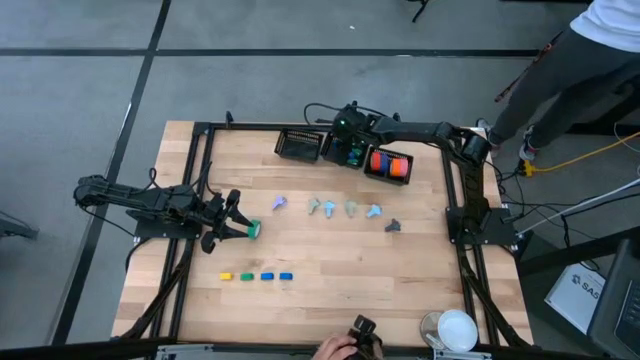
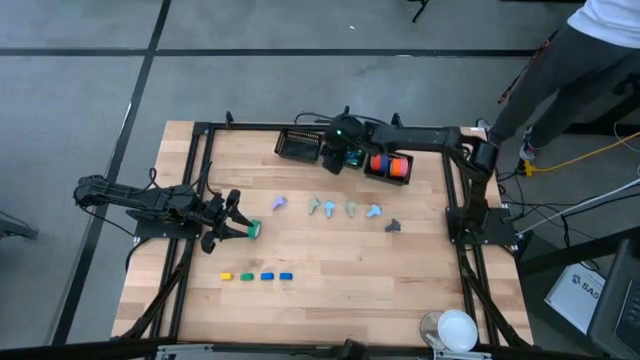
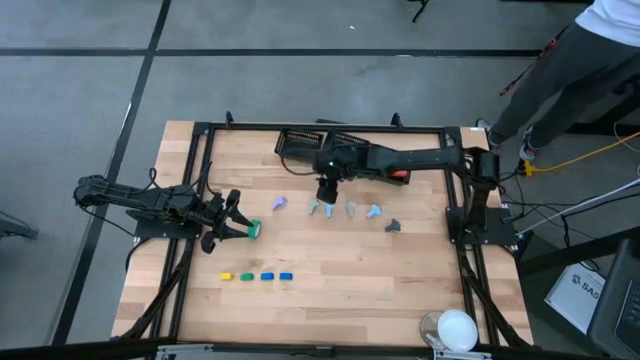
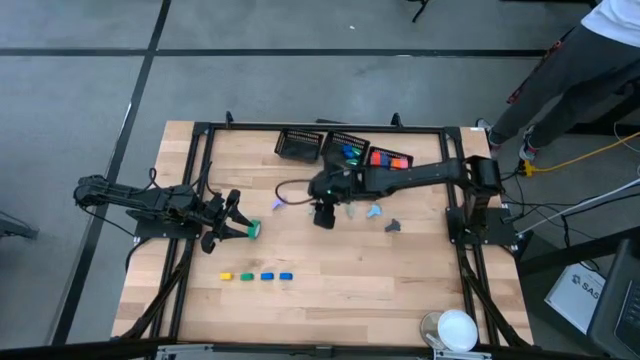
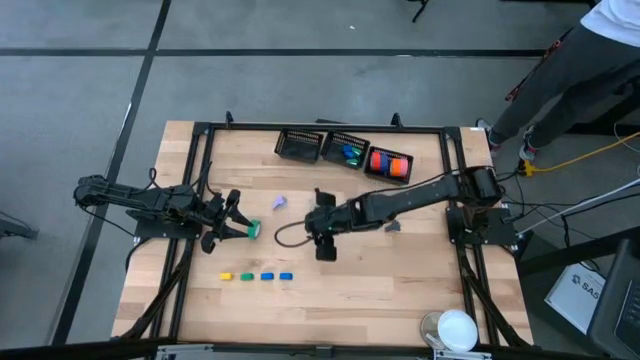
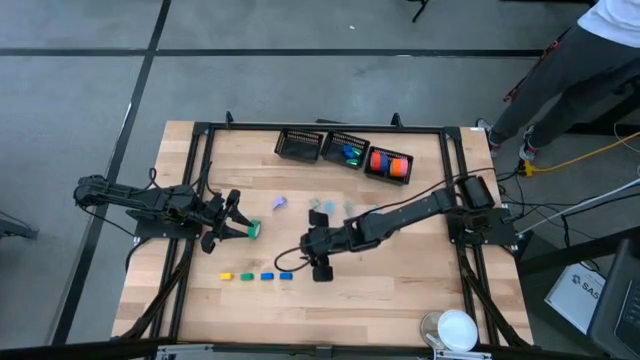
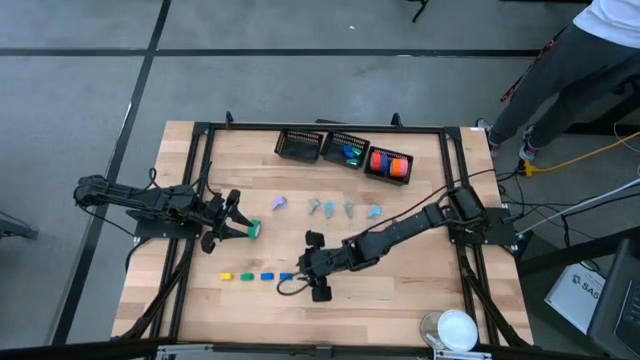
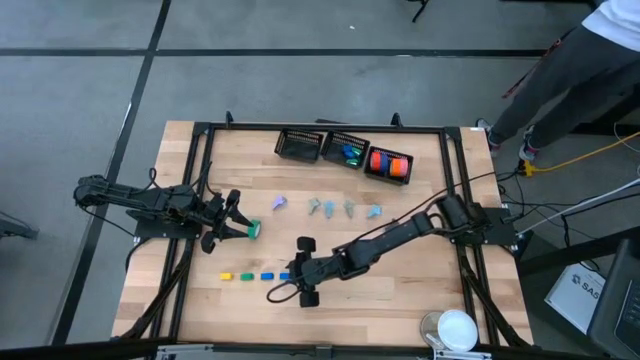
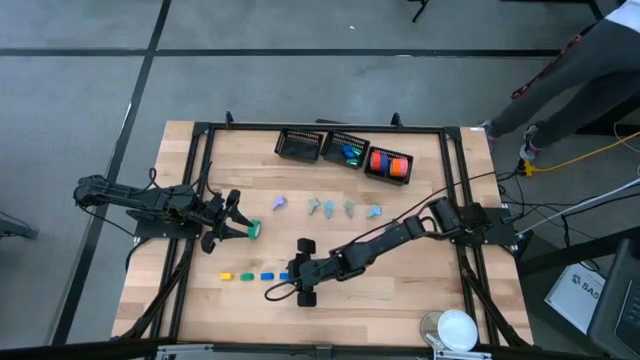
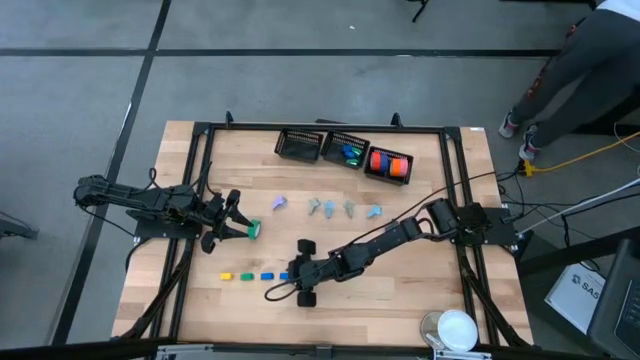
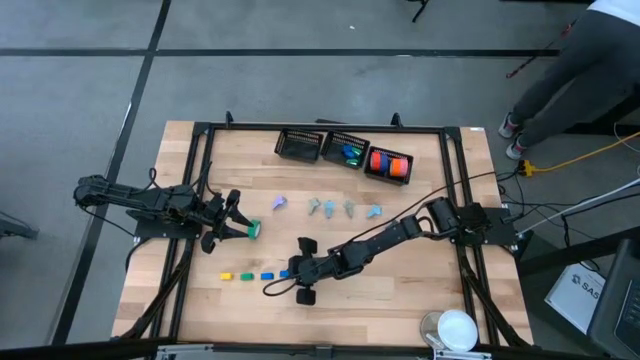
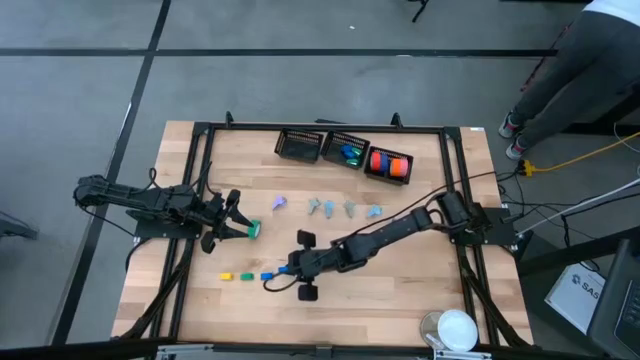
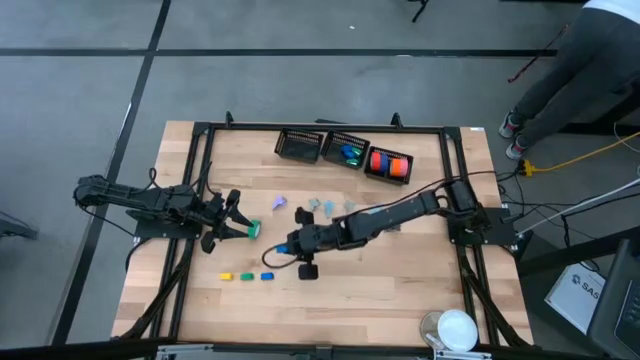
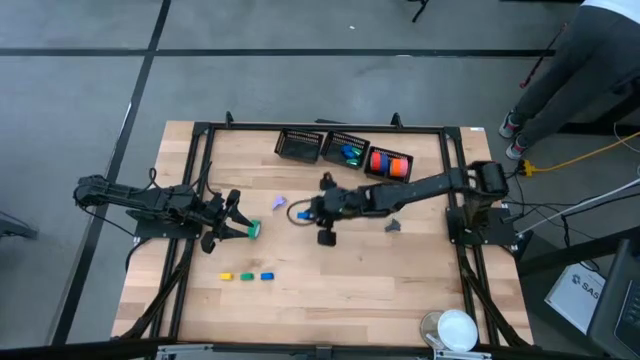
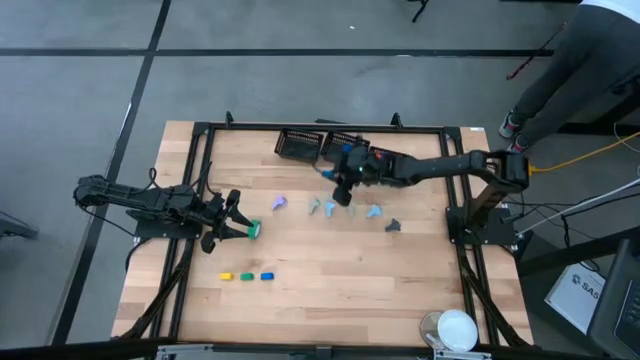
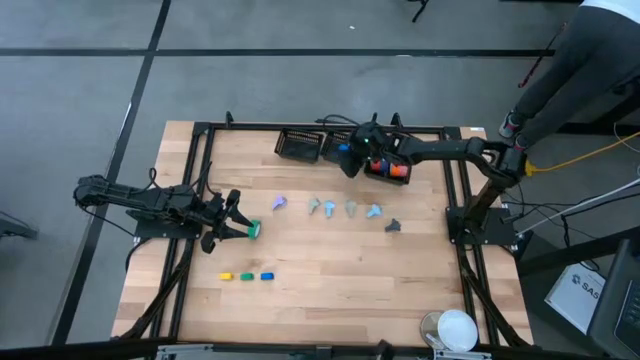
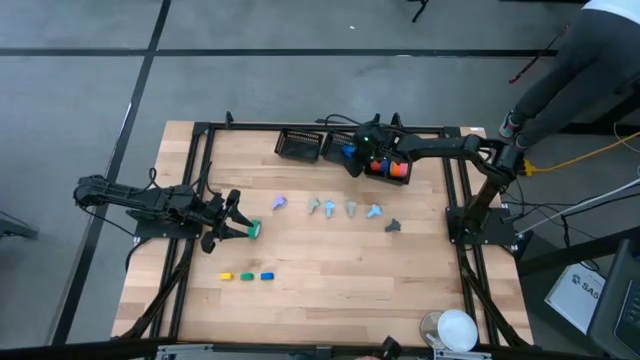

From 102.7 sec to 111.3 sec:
Task: Pick and place Stapler, Stapler remover, tape
Put the blue stapler into the middle black bin

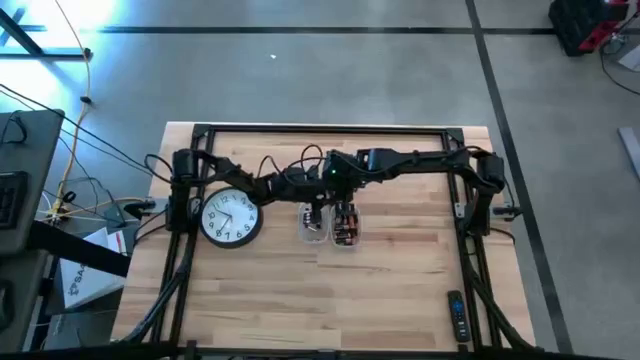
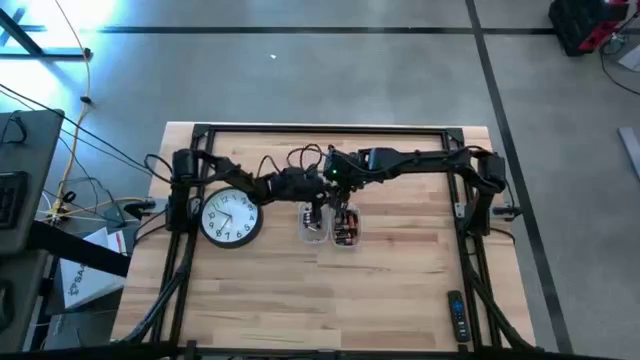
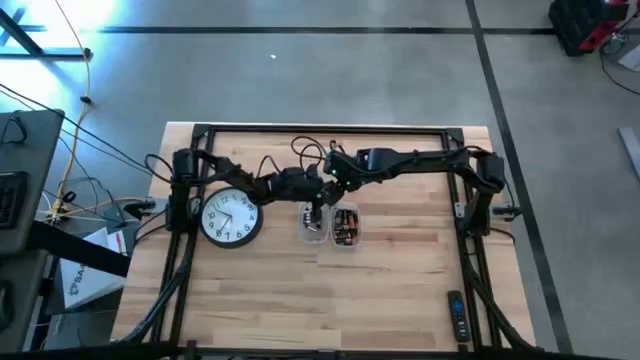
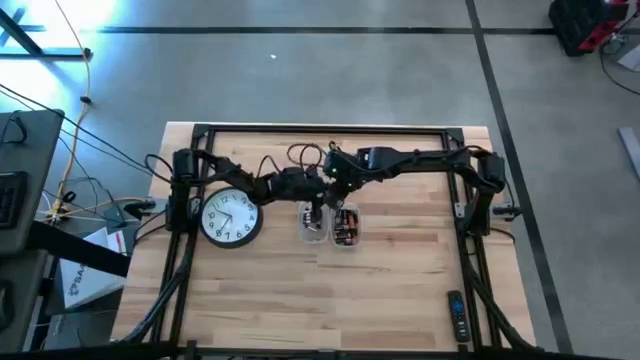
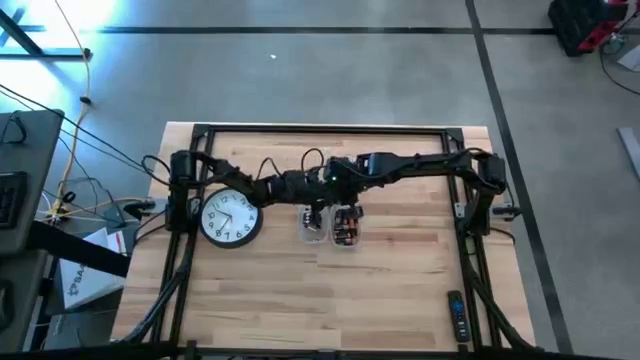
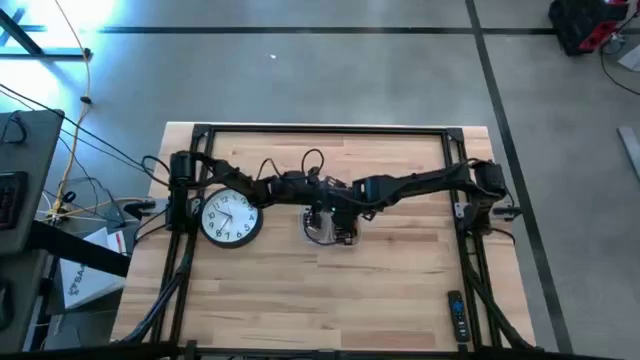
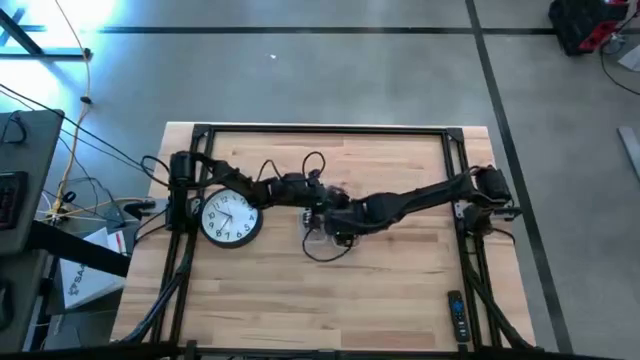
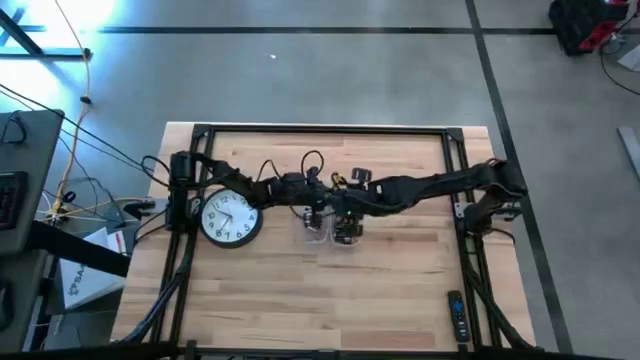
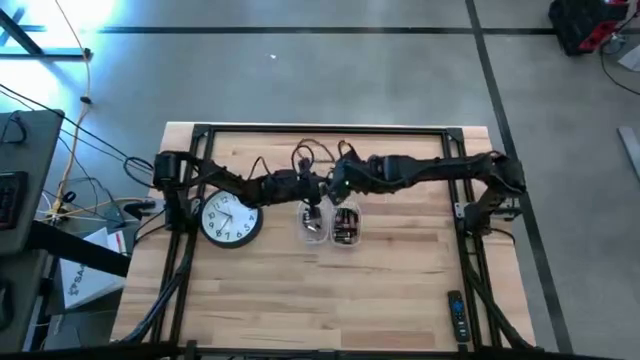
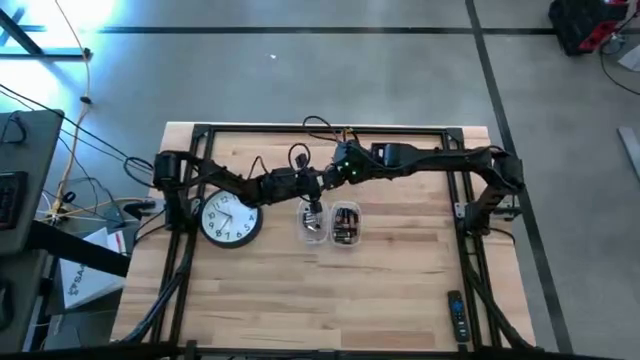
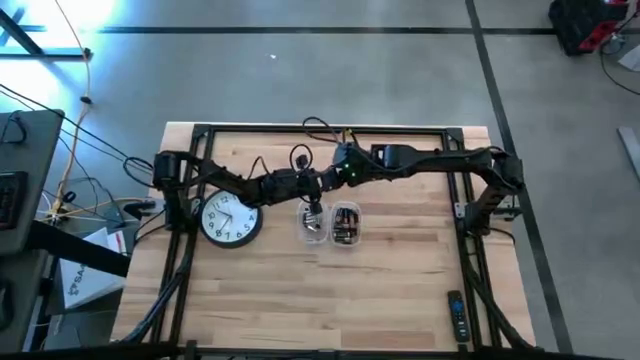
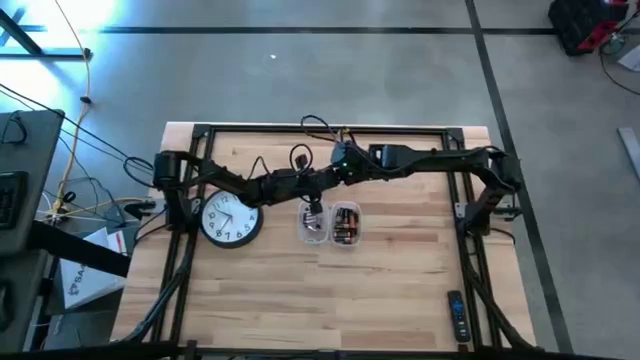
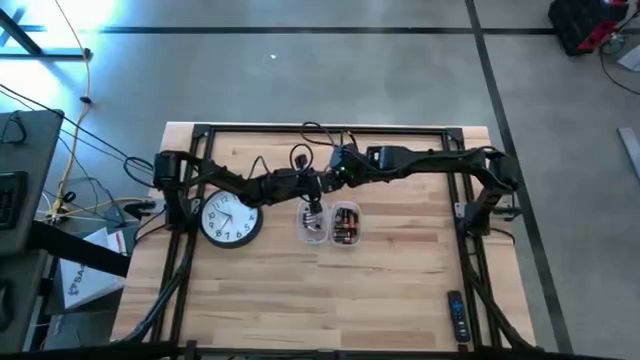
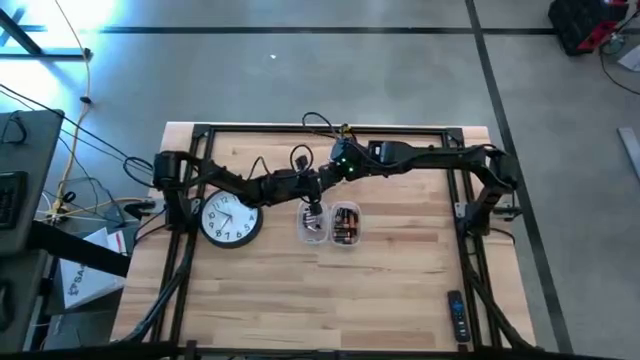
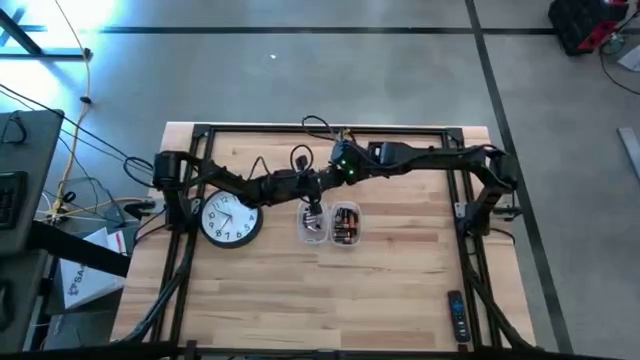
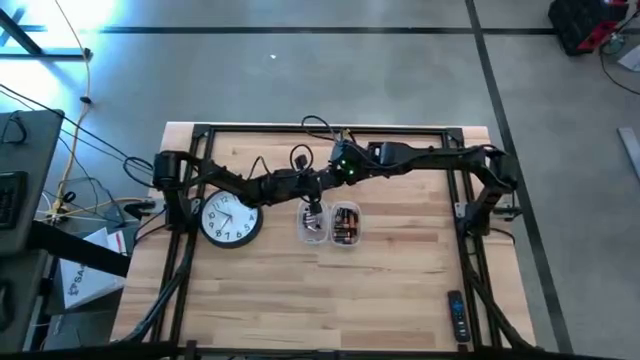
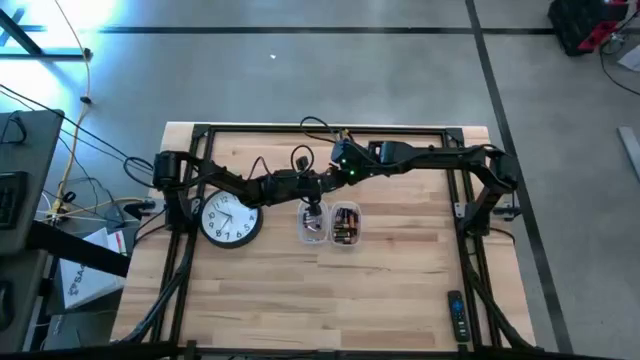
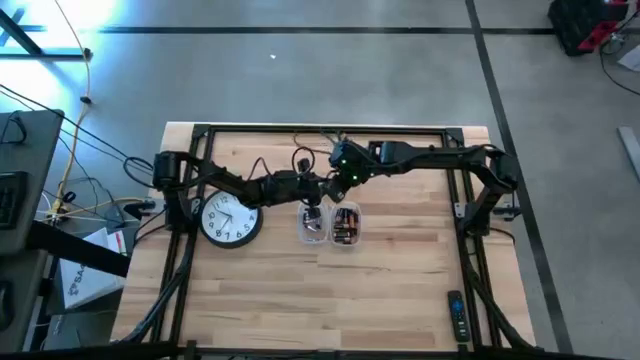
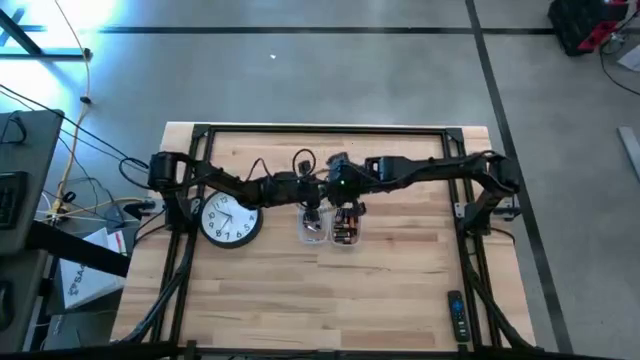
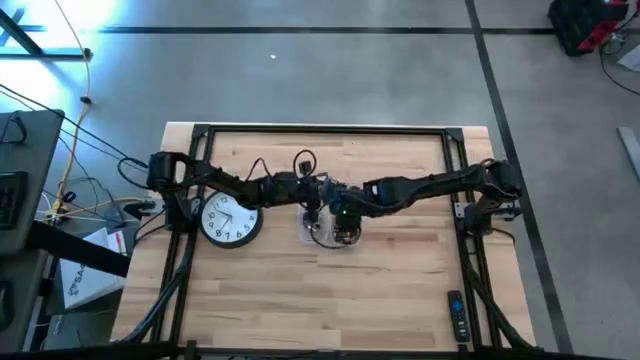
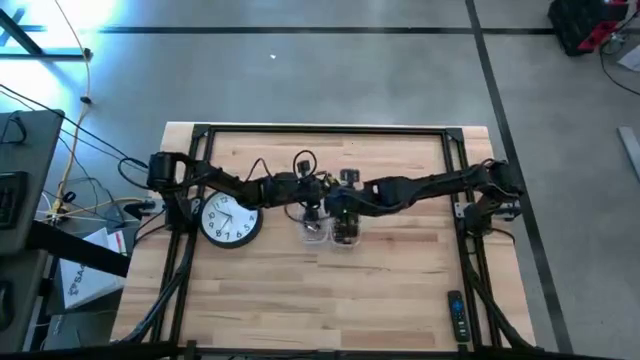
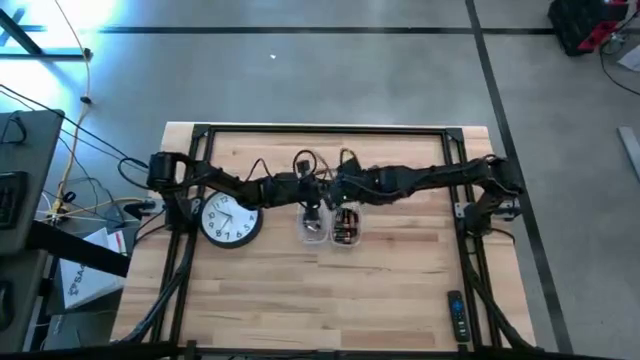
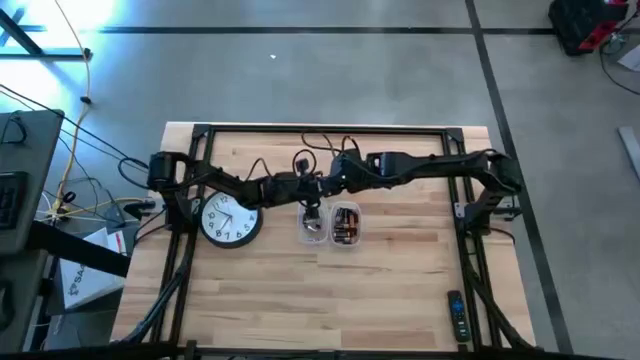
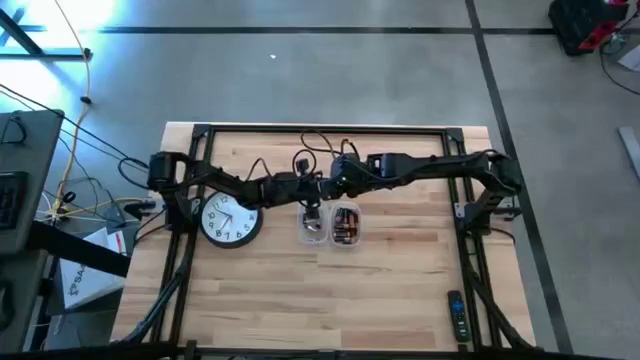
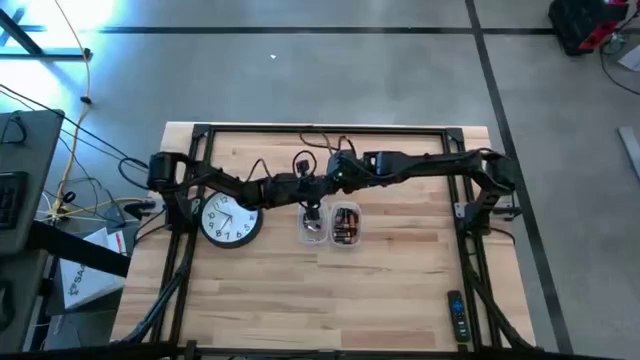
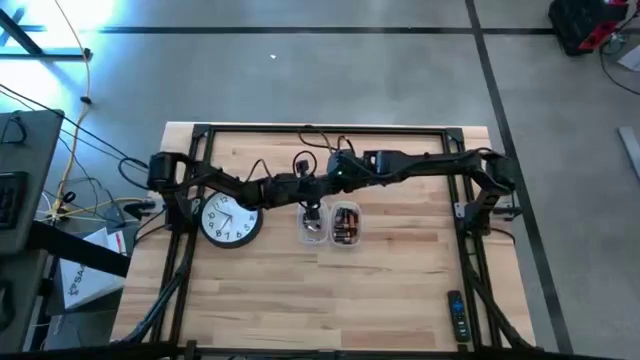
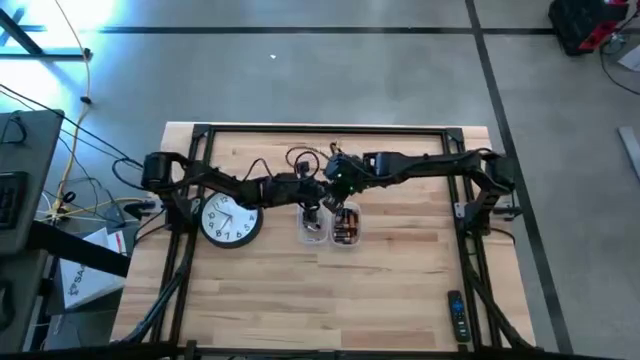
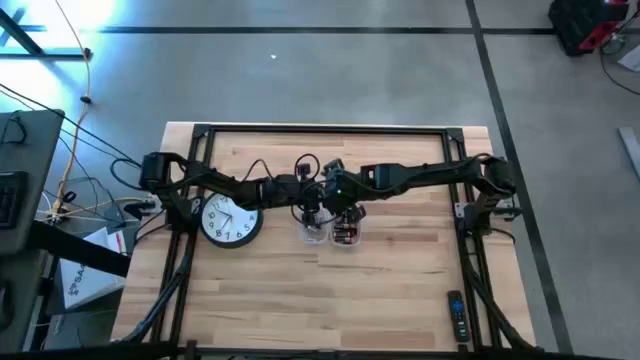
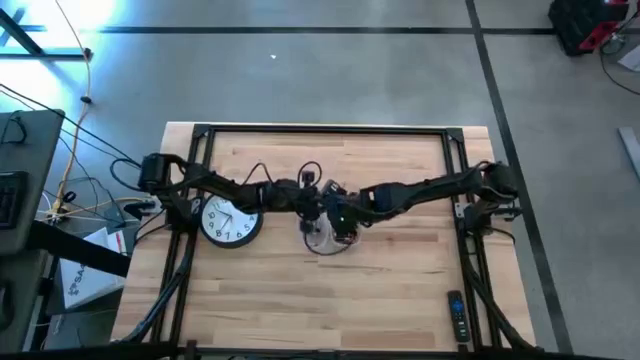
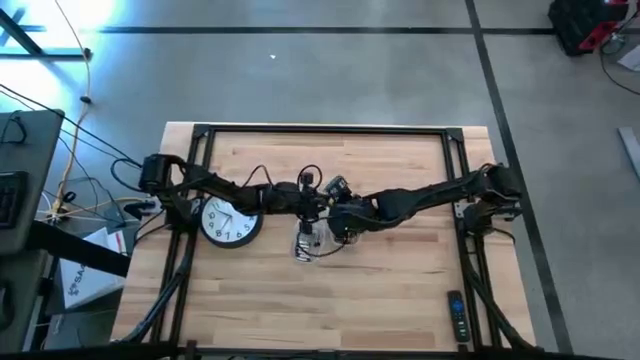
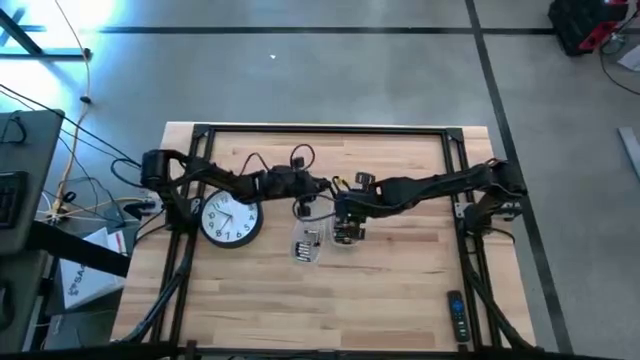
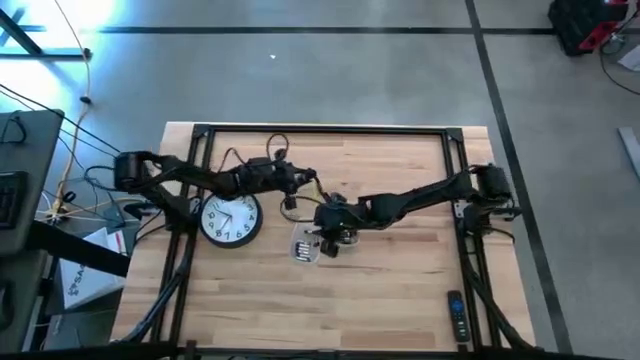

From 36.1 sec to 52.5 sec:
Task: Insert battery
Open the black flashlight lid
